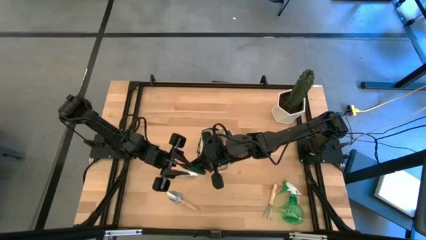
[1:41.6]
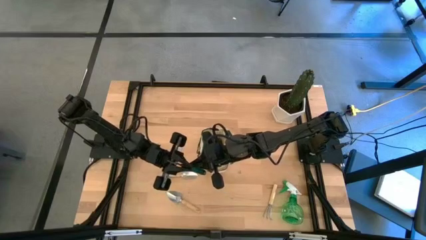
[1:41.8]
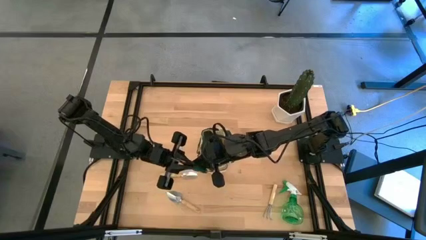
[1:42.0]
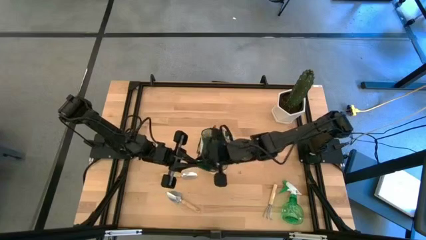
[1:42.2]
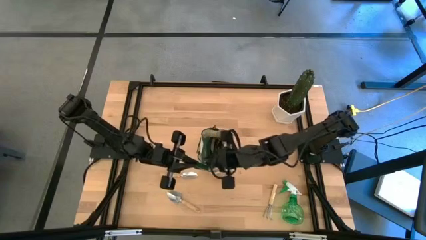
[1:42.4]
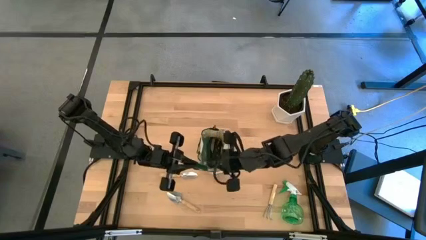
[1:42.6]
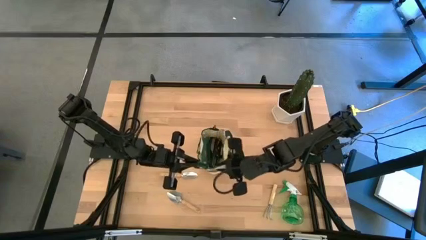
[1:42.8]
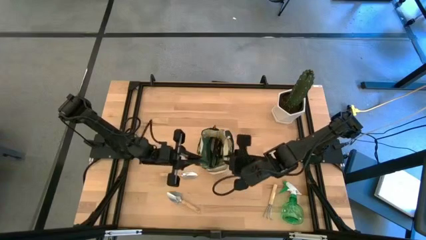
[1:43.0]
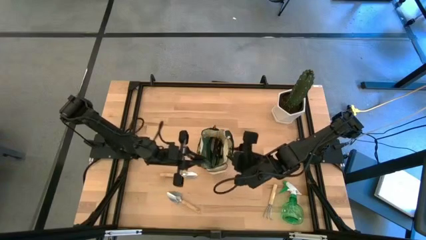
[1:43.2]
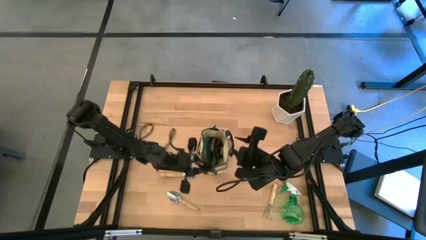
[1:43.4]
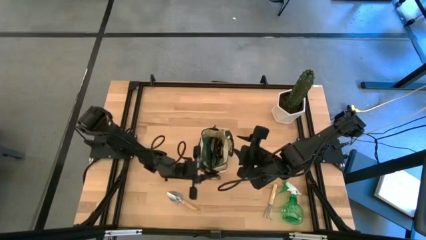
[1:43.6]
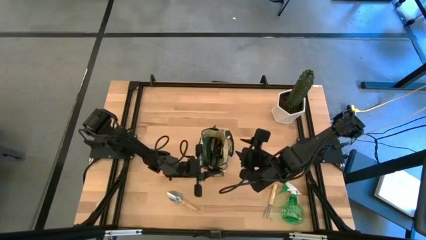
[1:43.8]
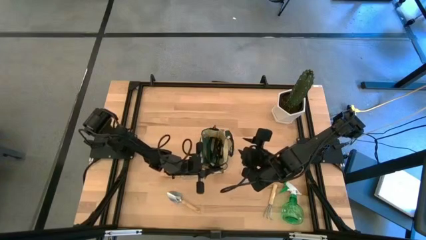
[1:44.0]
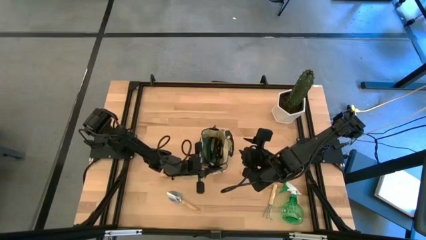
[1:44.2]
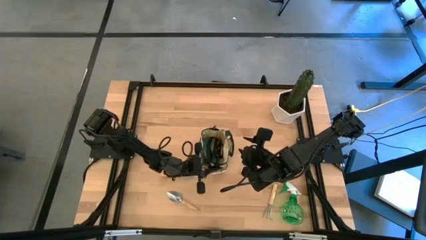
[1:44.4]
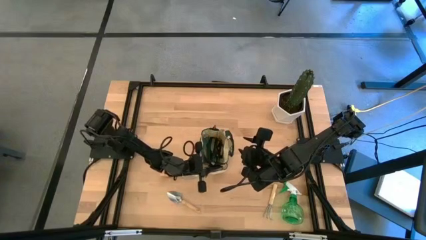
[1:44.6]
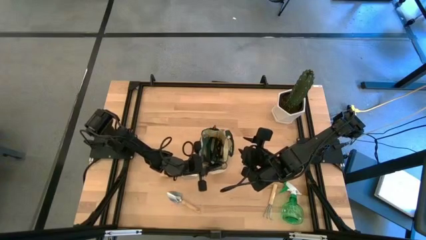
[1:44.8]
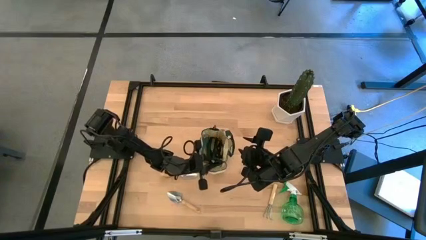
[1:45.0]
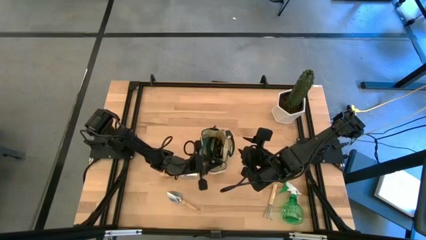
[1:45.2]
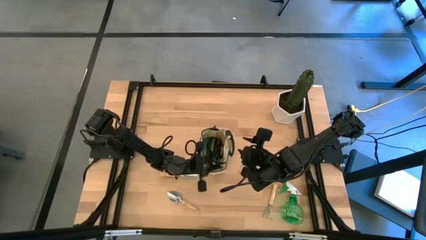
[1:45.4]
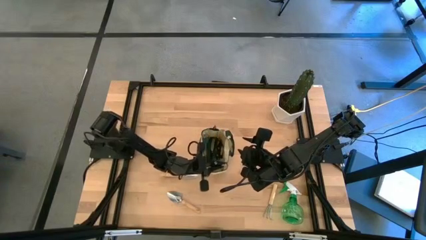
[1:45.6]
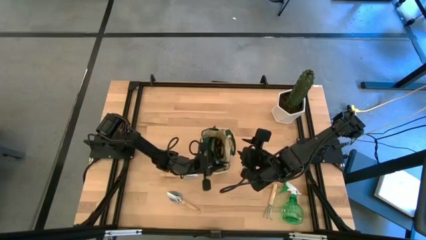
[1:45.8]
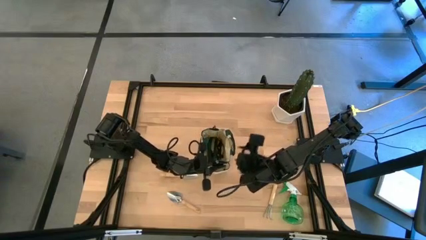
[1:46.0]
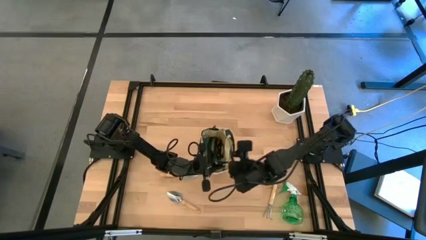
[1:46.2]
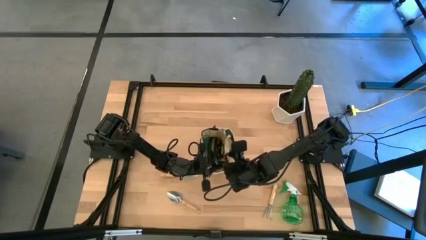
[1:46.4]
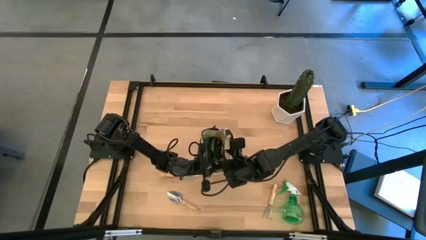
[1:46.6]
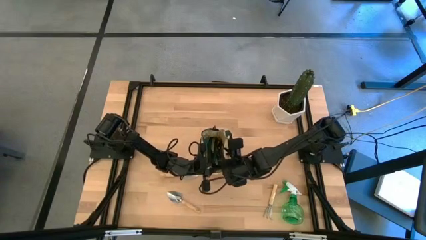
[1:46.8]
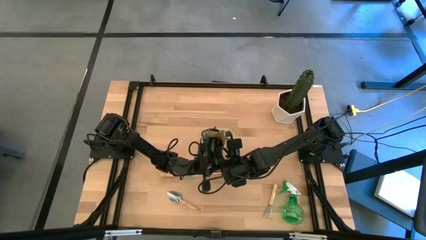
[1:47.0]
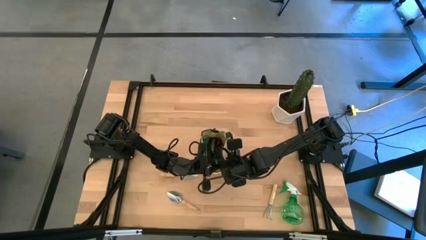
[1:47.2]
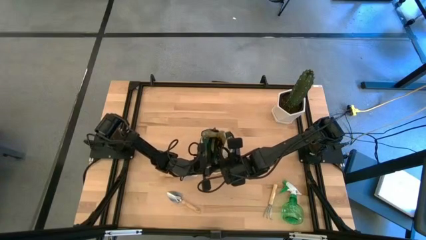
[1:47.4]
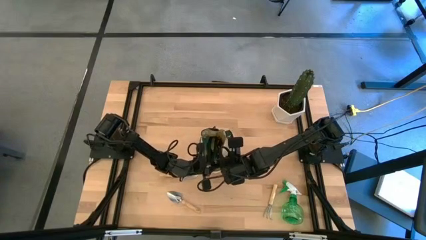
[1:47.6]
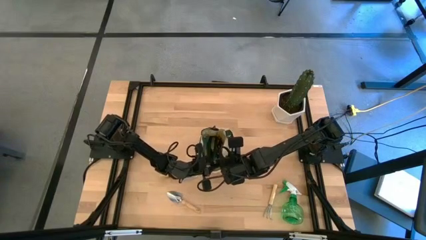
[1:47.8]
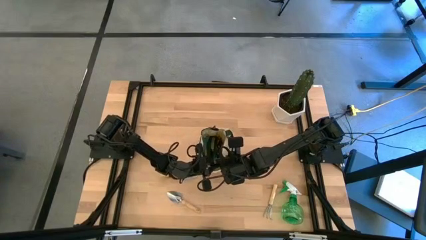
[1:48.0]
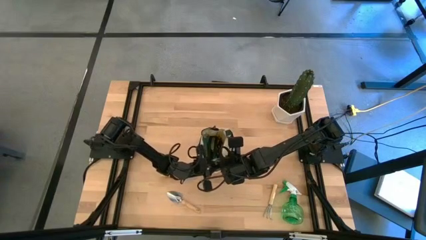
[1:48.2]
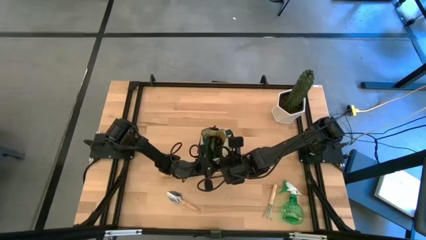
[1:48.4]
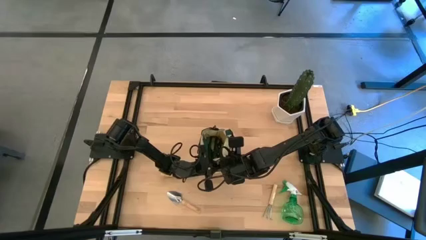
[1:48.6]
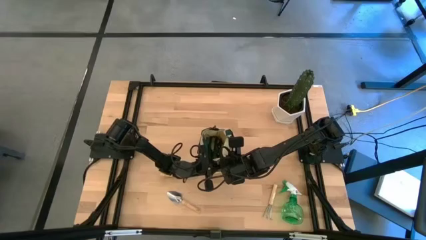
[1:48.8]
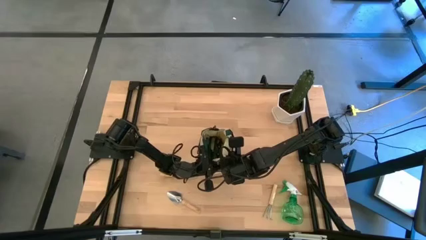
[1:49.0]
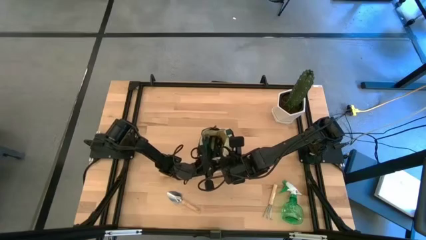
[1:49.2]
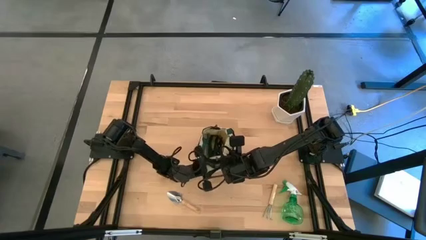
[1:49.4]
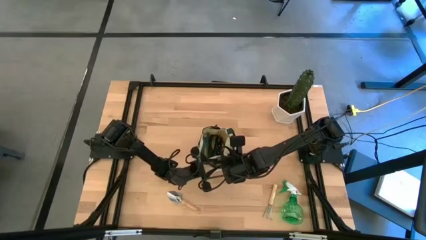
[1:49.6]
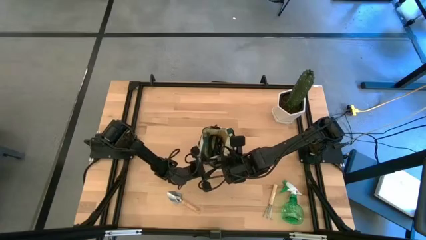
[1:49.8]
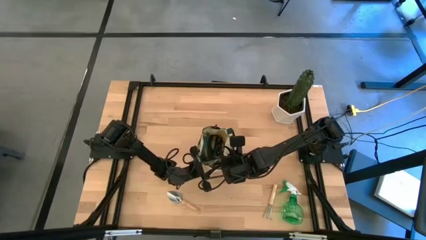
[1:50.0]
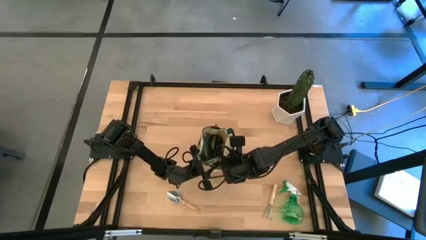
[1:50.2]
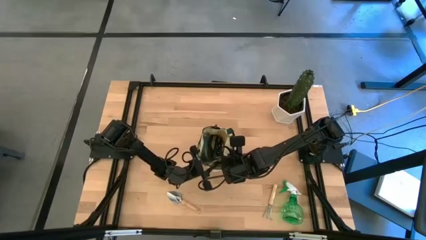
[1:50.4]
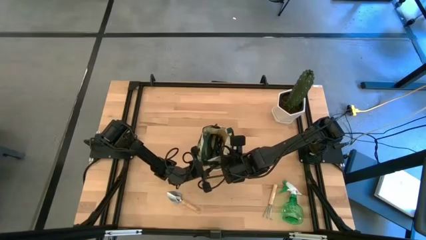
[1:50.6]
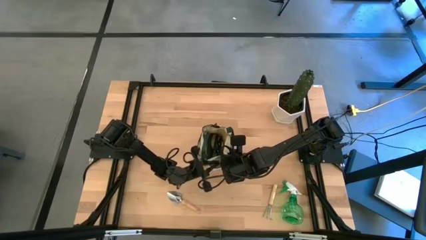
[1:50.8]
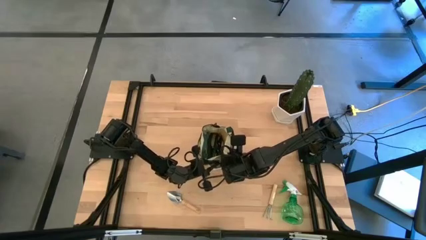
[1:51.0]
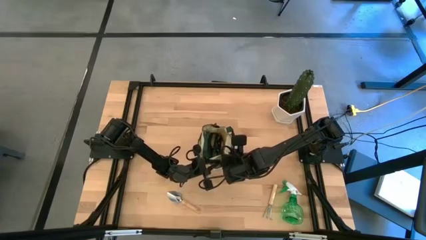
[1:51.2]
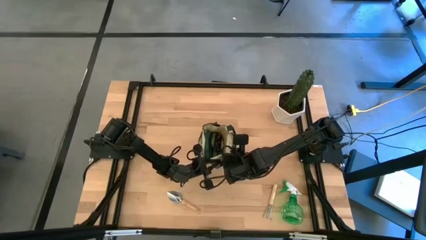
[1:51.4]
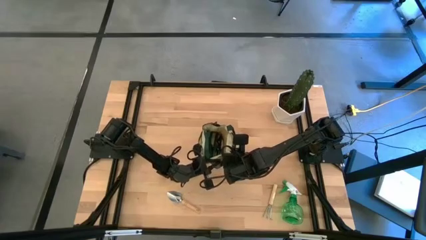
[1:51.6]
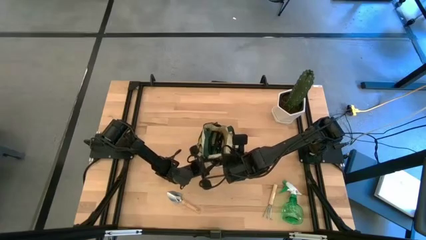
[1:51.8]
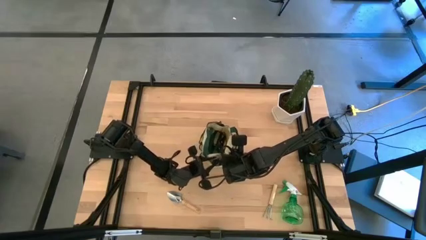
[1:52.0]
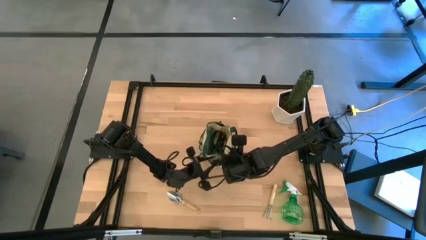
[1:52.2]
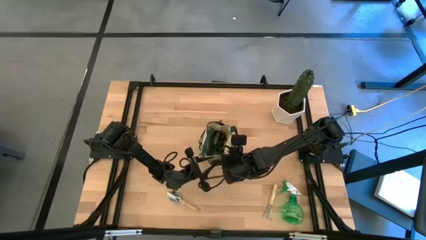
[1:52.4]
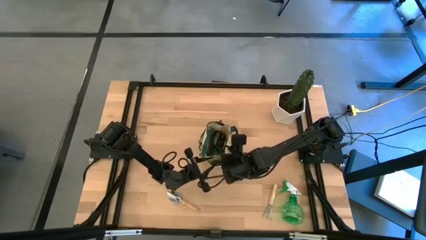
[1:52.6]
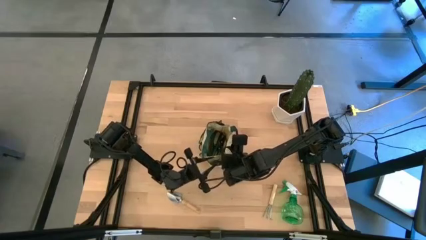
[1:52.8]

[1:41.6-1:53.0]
Task: Pick & Place Garden tools in Gardening bag
Put the green fruit pruner into the green gardening bag
